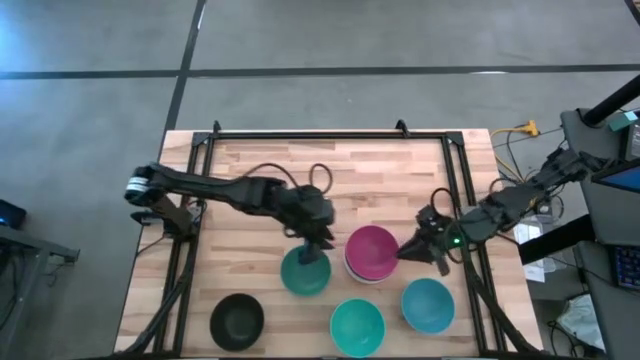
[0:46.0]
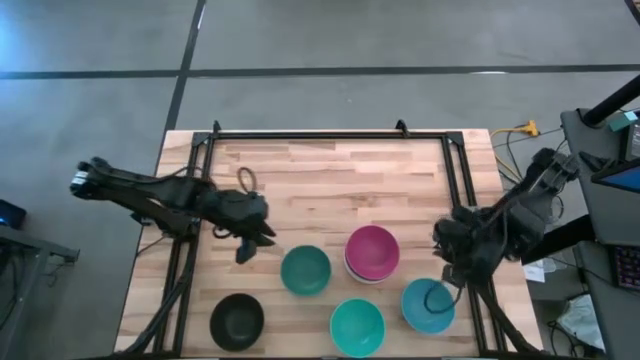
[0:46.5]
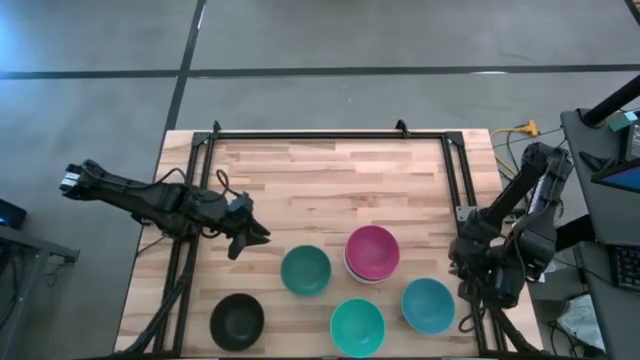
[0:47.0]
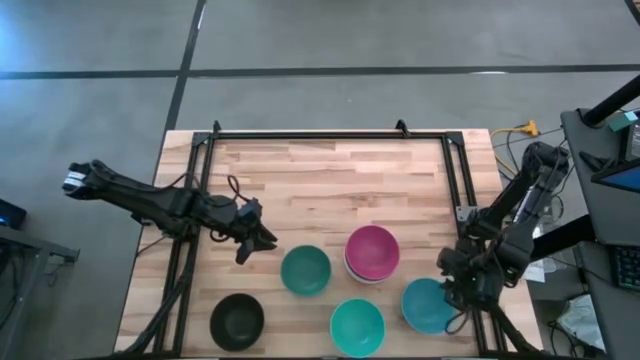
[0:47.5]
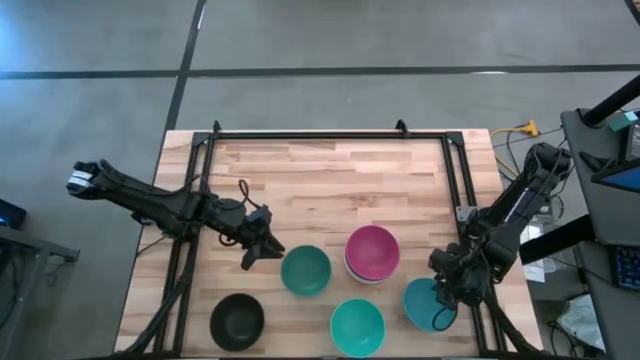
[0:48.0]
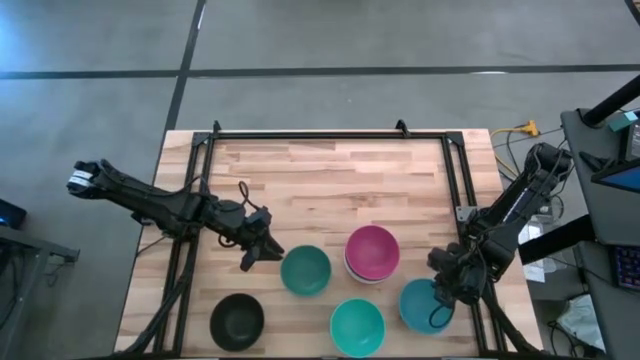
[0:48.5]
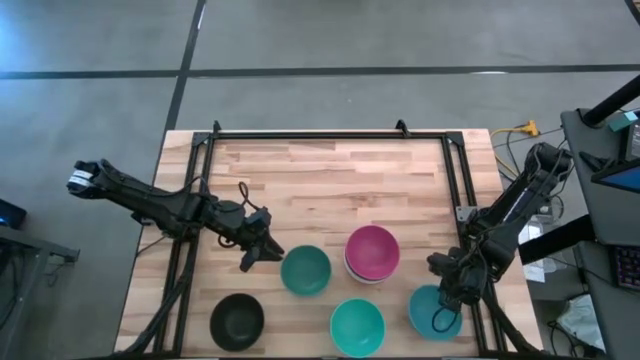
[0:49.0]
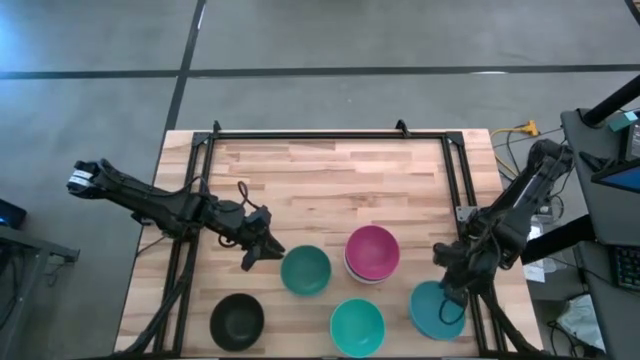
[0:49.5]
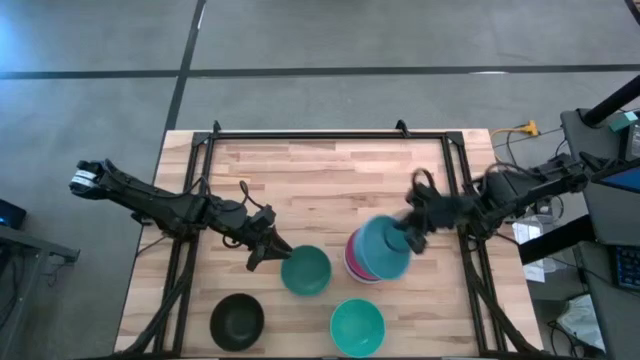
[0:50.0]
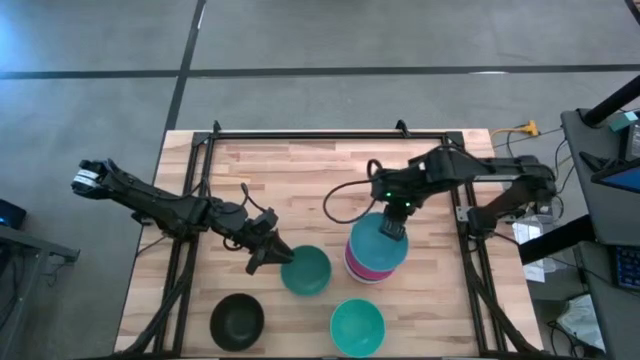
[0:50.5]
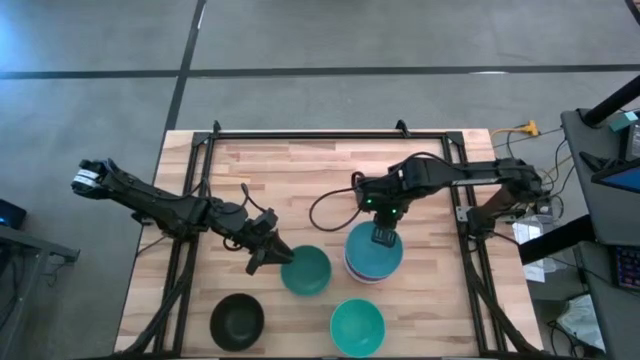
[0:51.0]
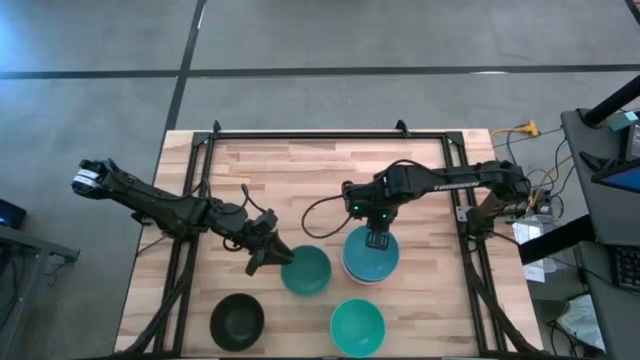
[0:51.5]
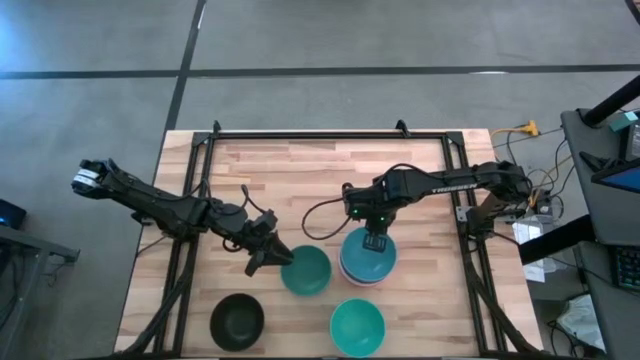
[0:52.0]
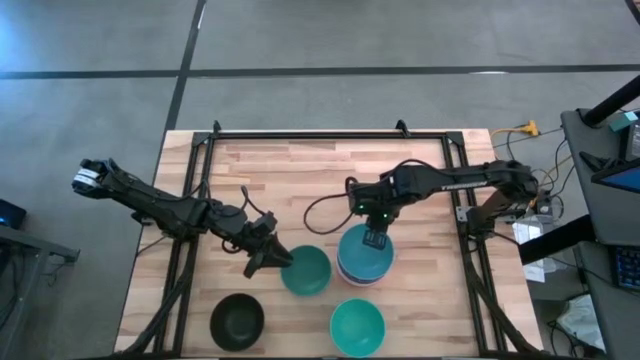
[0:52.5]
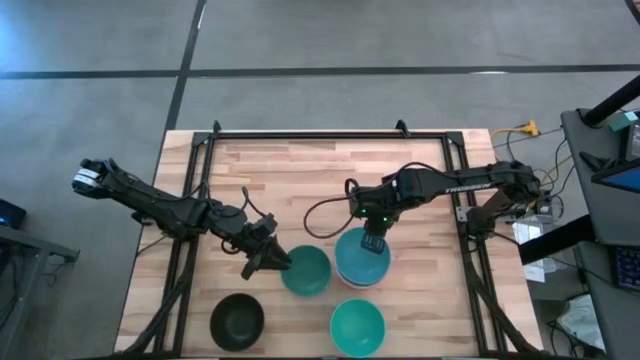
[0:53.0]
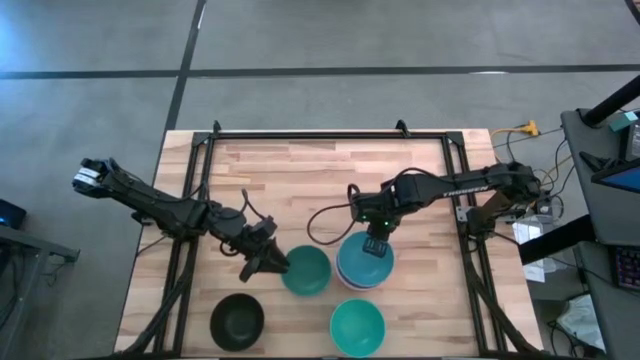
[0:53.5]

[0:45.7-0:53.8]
Task: Nest bowls inside each other
Stack the blue bowl on top of the pink bowl

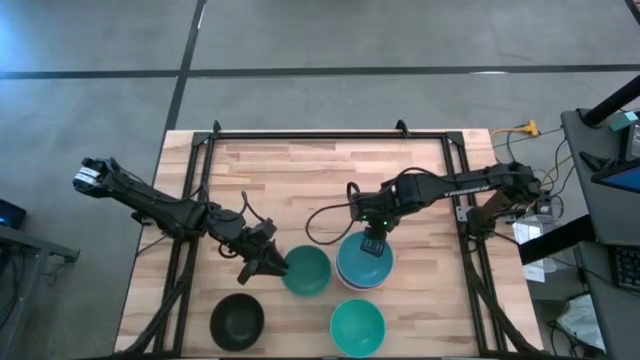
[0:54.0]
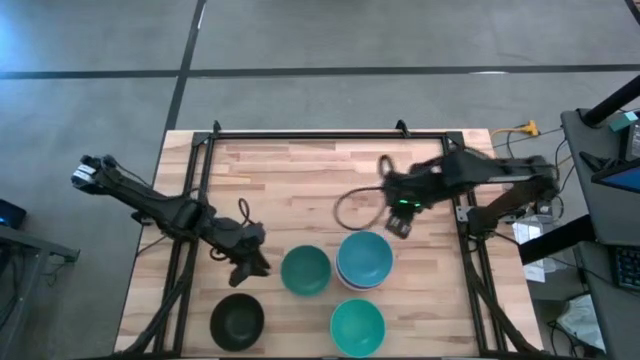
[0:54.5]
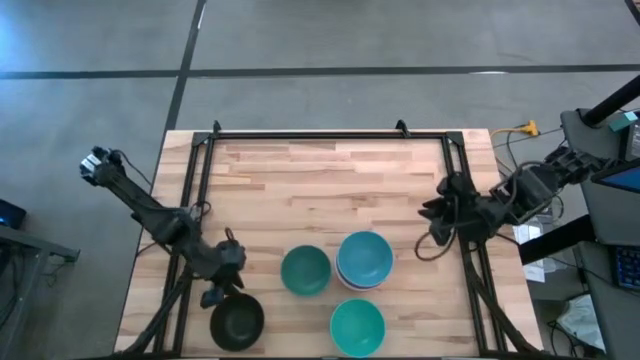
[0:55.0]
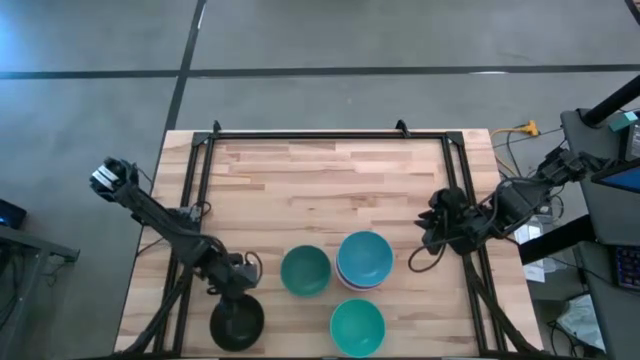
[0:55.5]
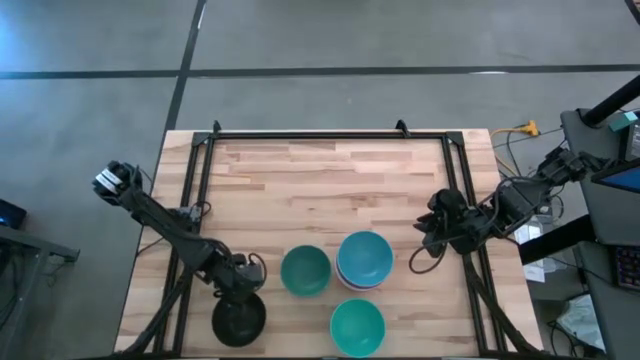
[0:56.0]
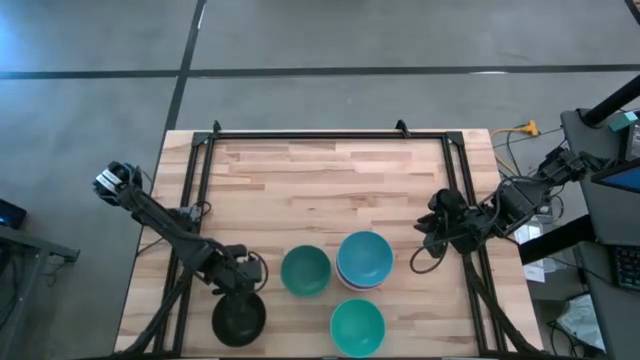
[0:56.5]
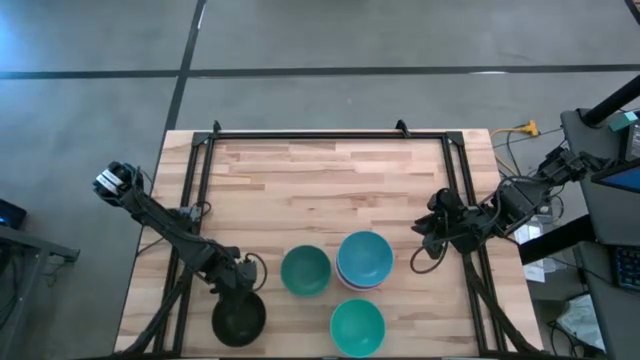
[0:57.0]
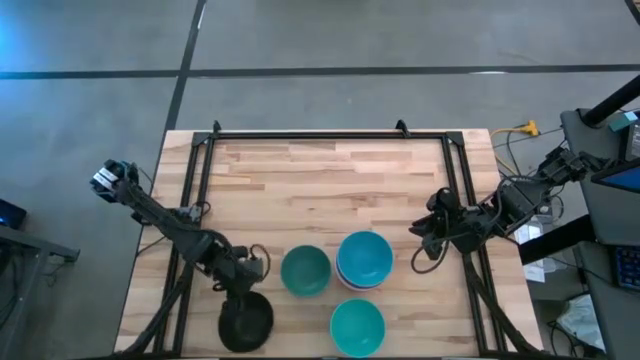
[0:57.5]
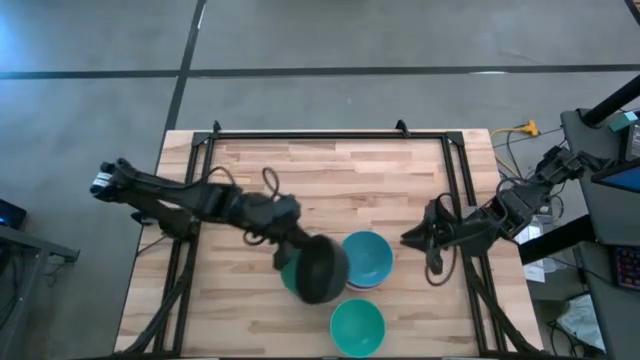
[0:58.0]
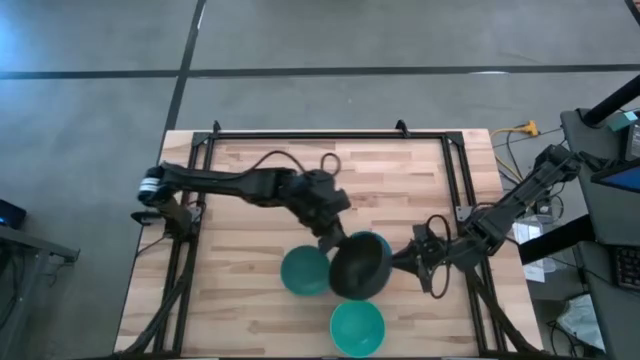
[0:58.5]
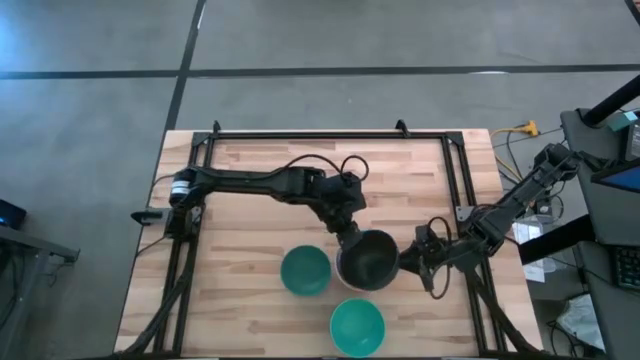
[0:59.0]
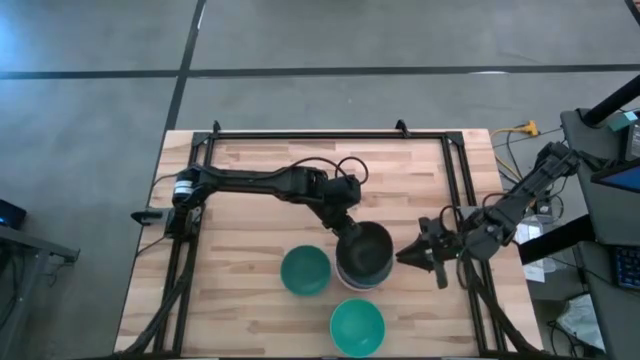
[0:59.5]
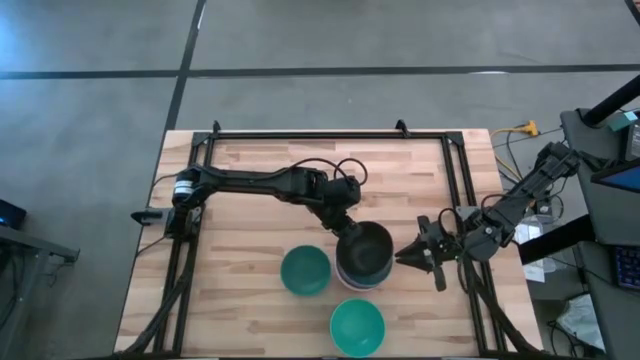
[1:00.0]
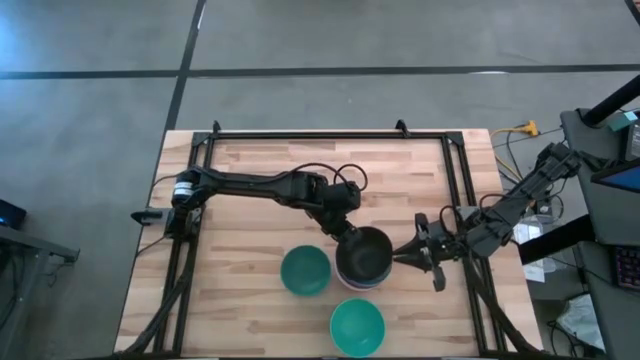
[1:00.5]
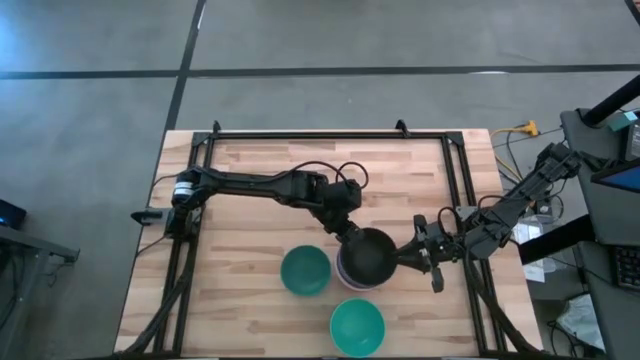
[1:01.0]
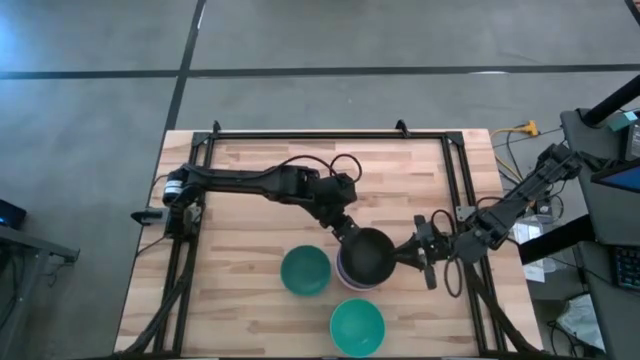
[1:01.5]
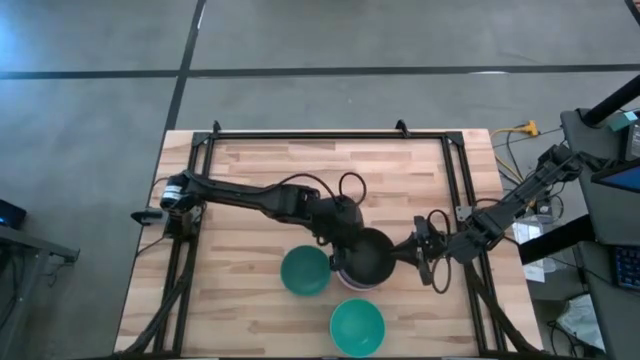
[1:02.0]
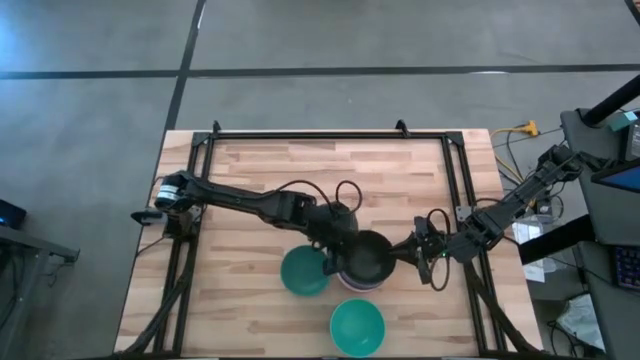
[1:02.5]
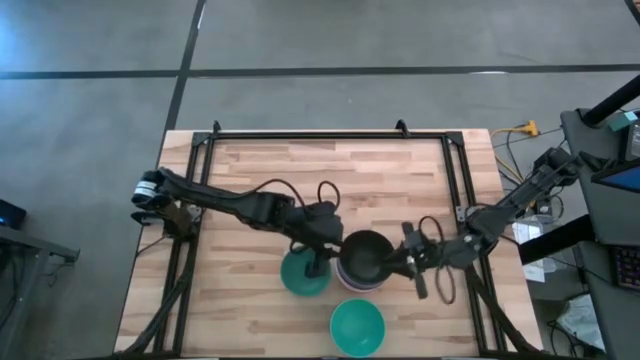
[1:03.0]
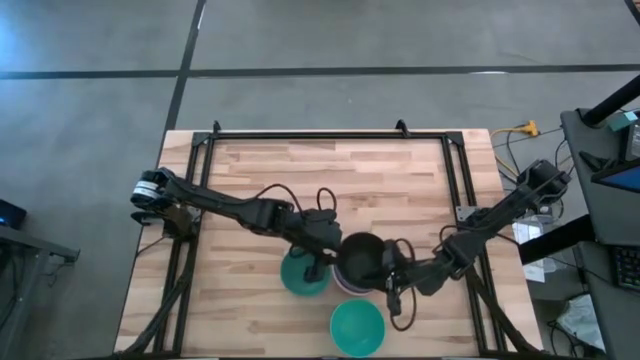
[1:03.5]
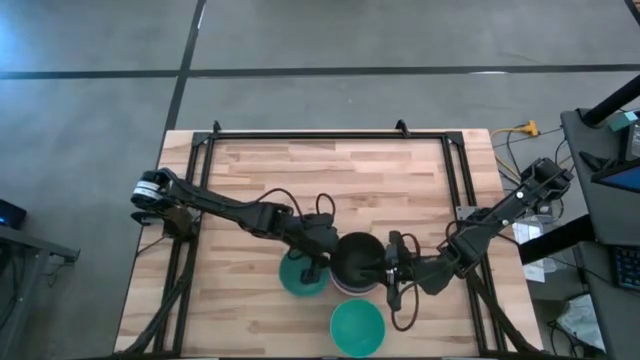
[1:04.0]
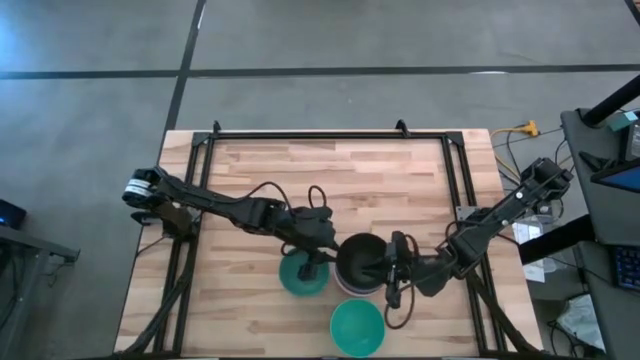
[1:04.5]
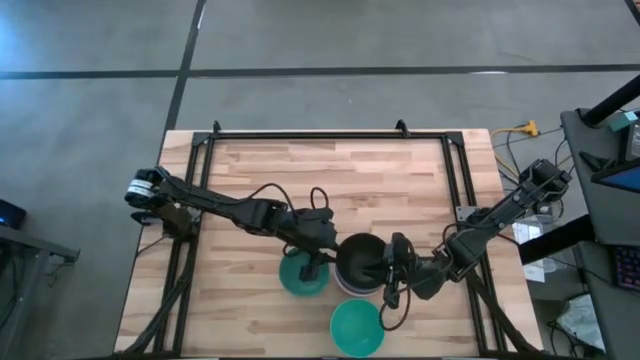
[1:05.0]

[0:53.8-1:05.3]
Stack the black bowl on top of the blue bowl
